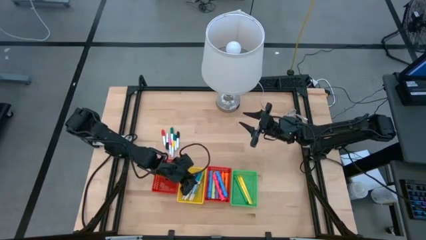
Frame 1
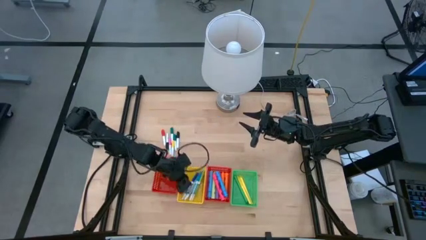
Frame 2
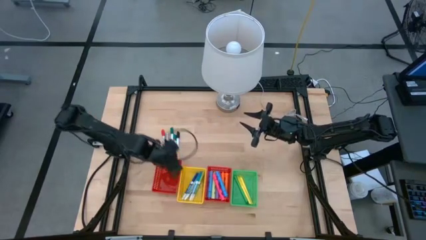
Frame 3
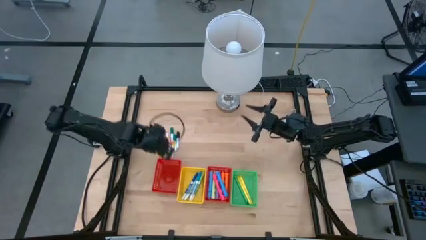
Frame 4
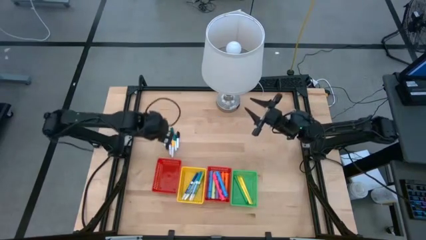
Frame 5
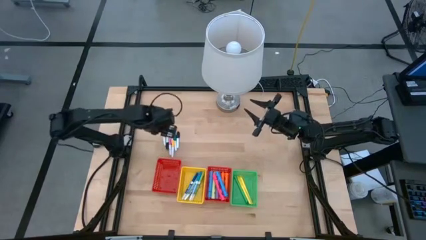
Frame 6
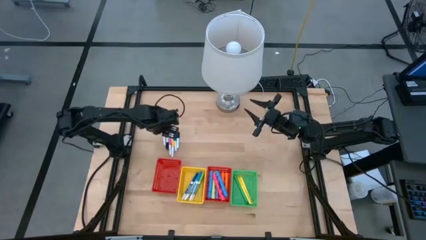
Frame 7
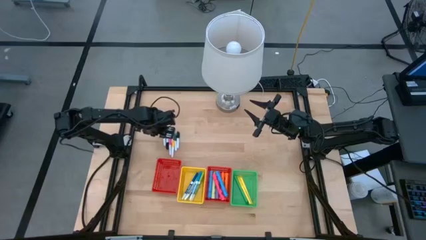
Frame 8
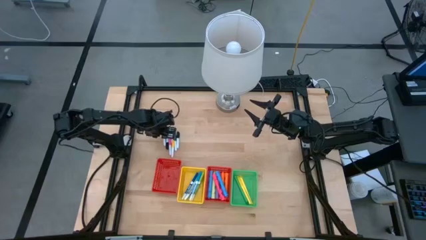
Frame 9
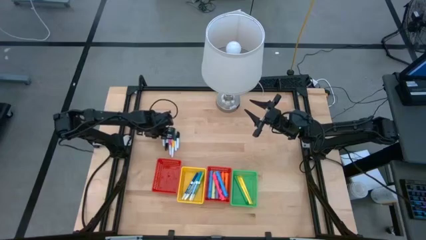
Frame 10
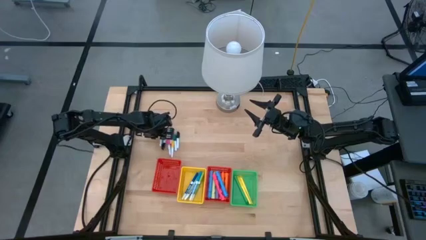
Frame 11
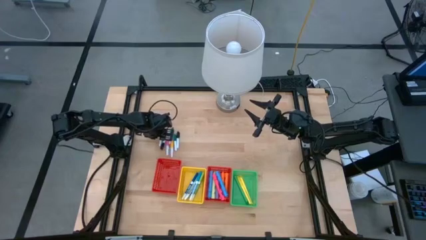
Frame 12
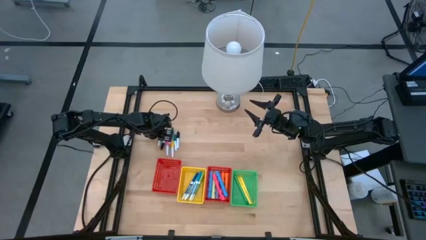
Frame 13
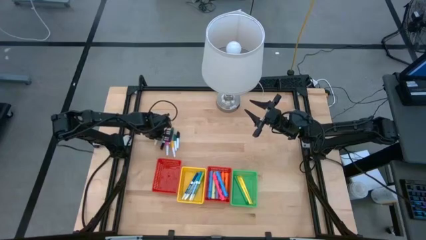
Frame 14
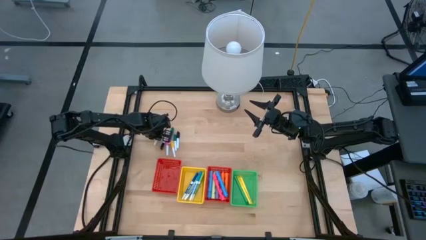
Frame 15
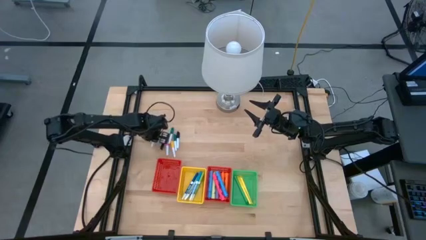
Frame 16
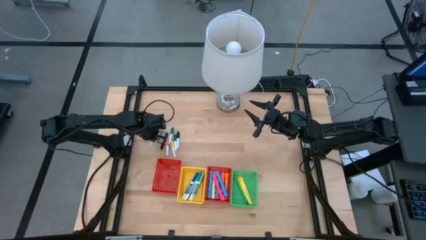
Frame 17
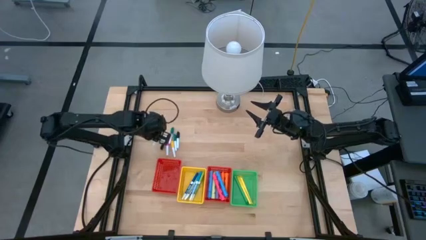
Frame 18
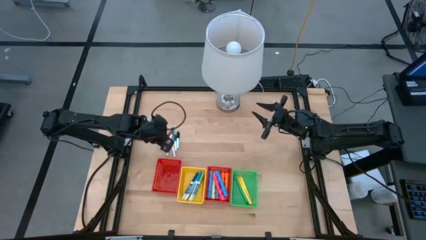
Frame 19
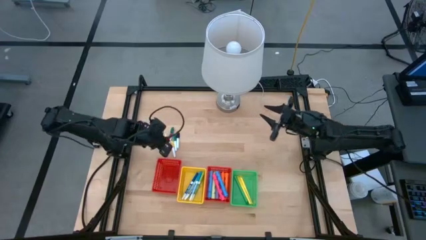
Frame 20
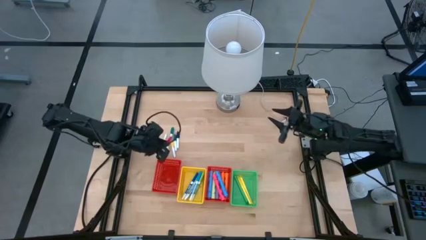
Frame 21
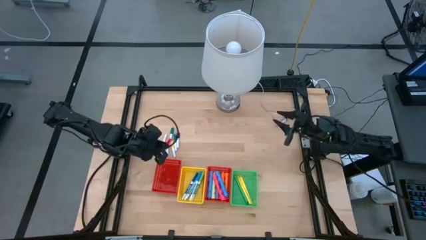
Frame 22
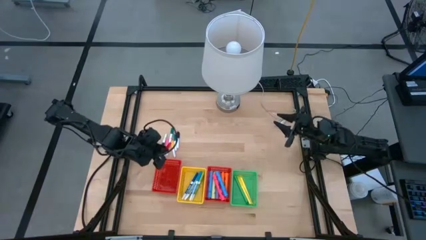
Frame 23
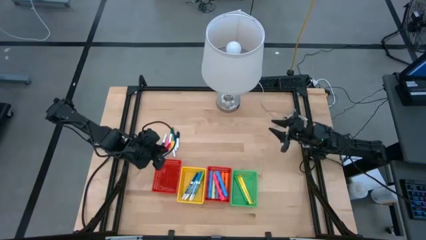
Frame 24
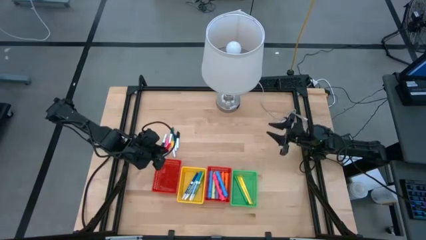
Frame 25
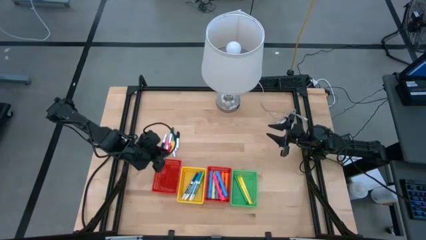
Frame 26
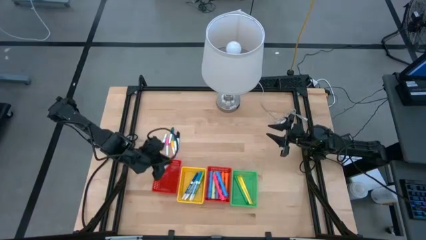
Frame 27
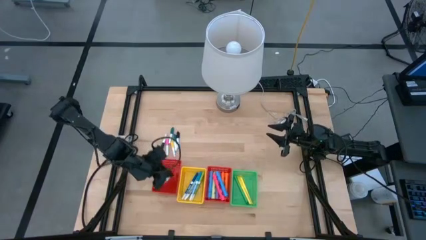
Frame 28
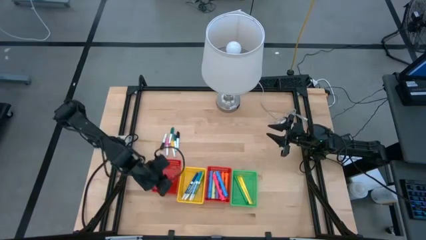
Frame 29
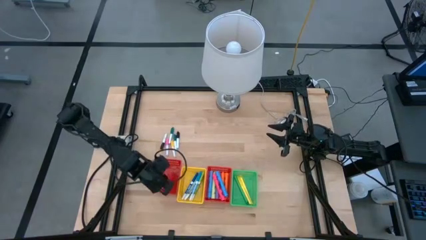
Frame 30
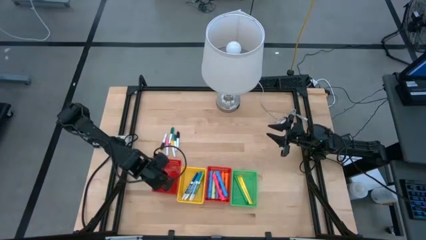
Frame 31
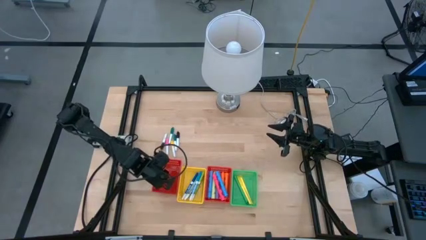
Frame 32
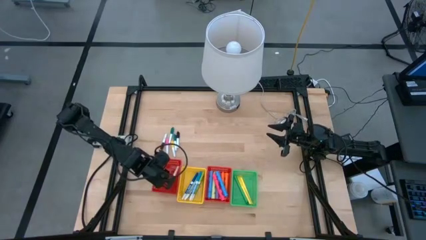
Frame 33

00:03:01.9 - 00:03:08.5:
Task: Pick & Place Markers
Put the small red highlighter into the left red bin

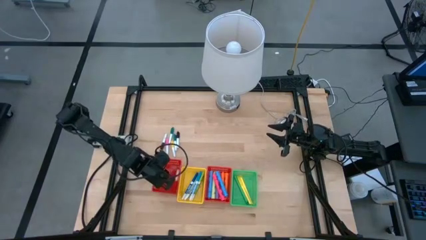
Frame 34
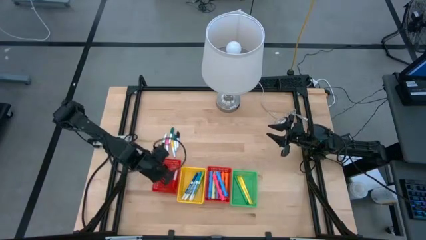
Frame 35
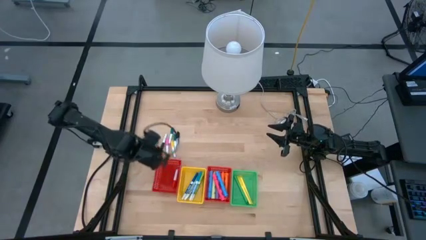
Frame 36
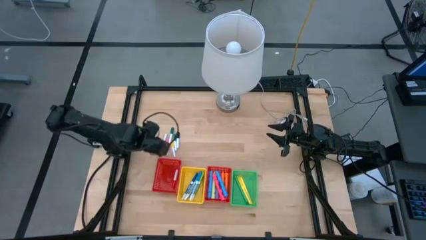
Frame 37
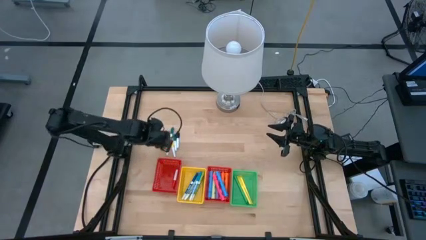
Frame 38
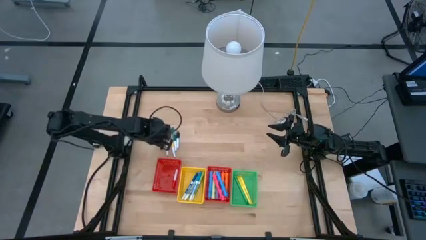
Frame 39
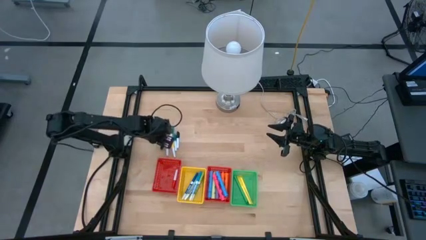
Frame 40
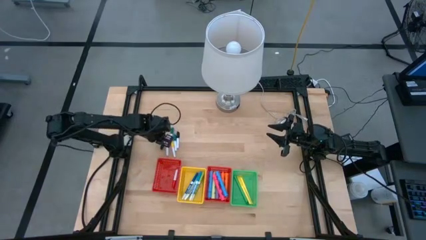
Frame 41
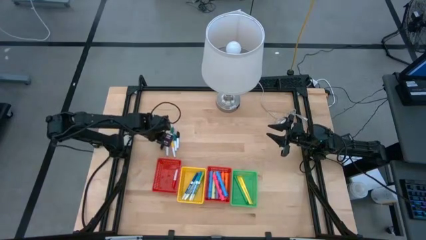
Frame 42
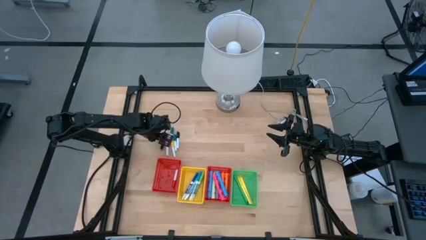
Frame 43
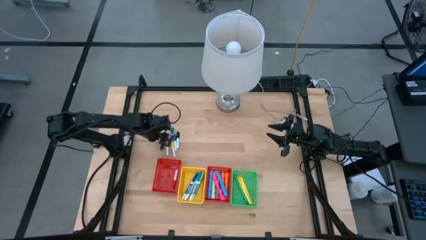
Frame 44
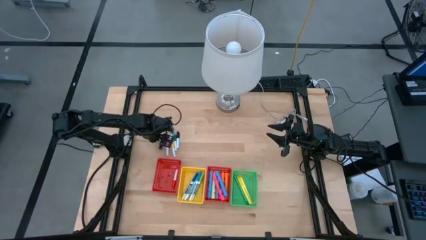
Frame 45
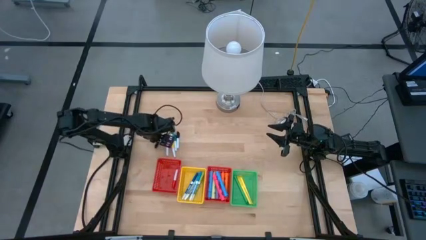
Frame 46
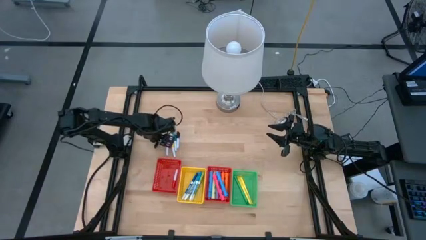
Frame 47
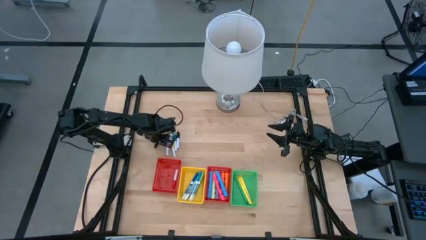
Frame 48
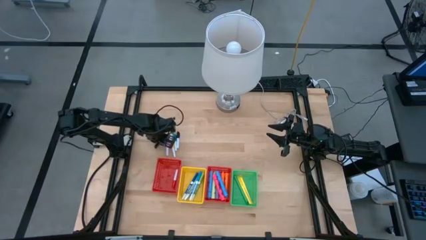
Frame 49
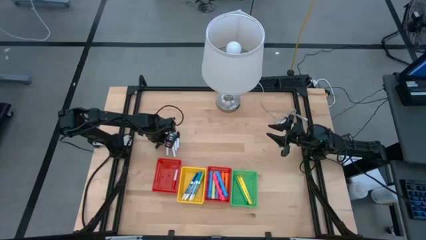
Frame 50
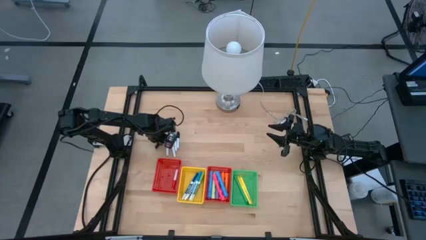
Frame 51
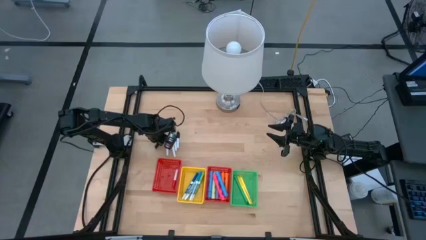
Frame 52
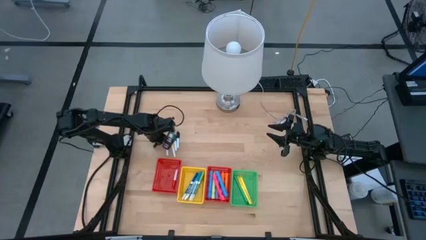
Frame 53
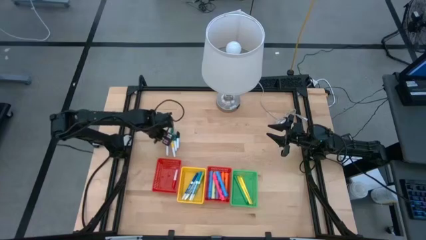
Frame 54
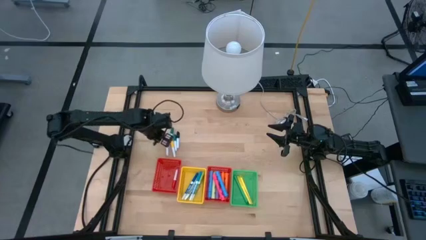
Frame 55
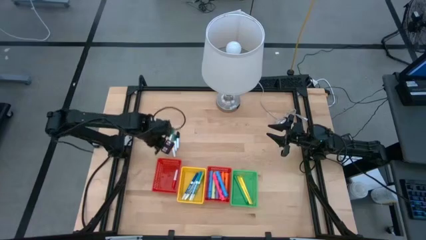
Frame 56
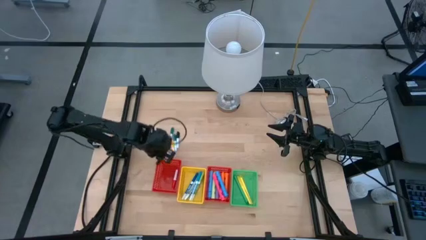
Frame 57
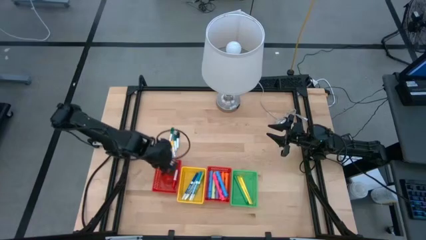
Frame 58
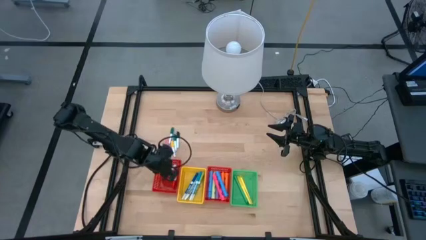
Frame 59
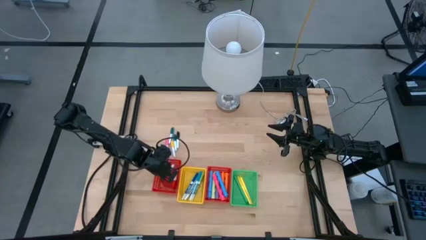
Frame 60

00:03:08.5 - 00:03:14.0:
Put the small black highlighter into the left red bin
